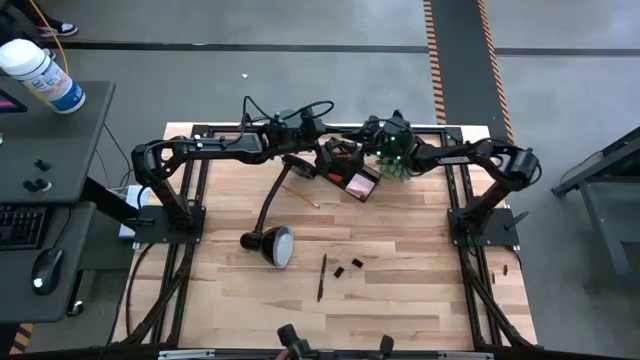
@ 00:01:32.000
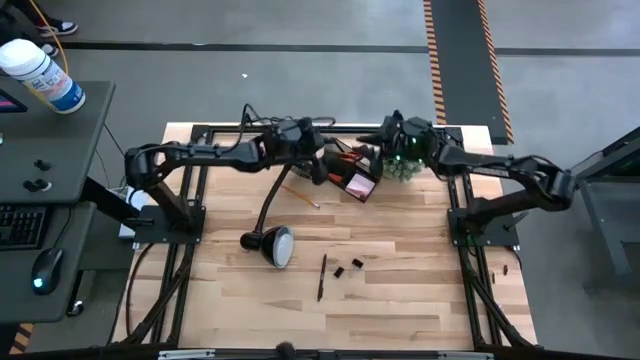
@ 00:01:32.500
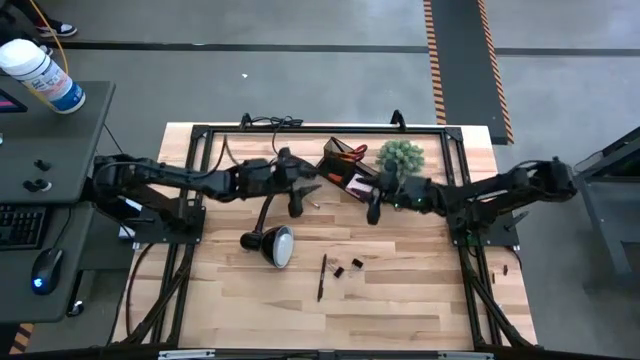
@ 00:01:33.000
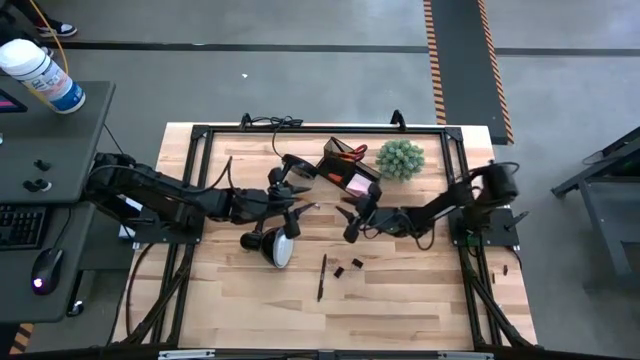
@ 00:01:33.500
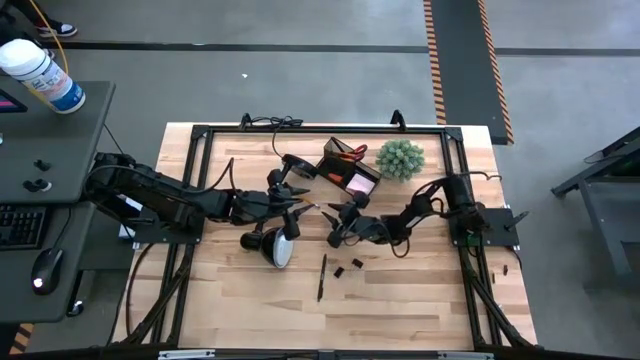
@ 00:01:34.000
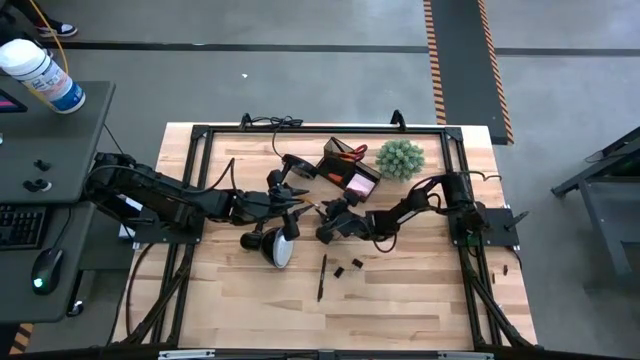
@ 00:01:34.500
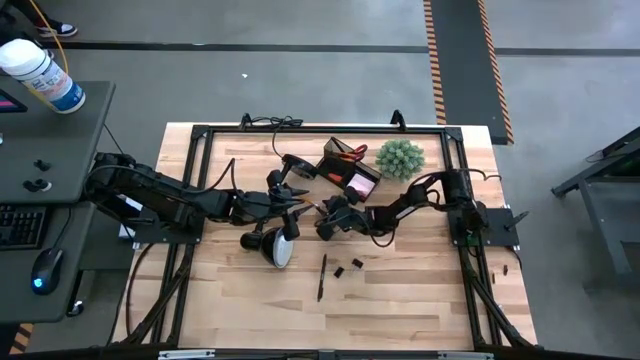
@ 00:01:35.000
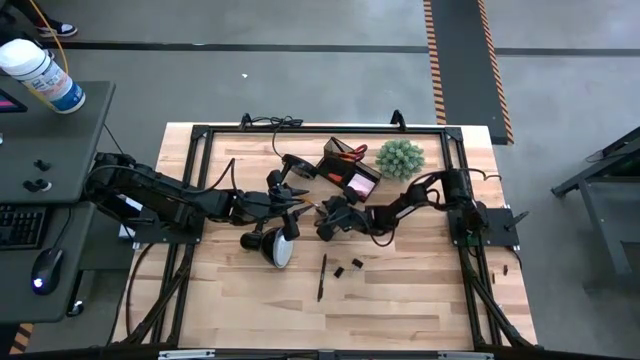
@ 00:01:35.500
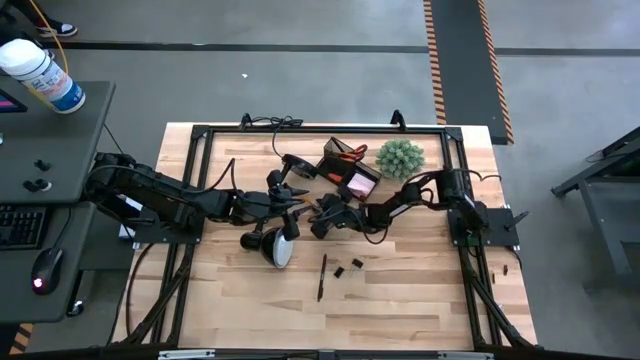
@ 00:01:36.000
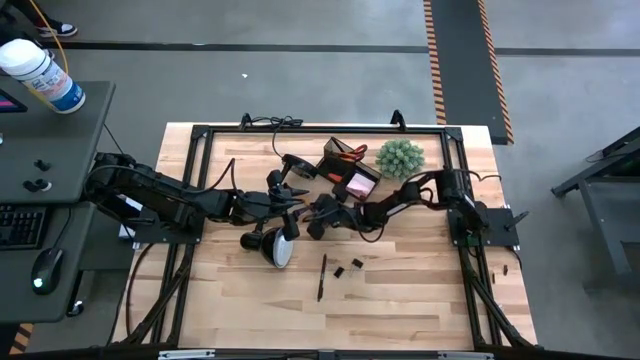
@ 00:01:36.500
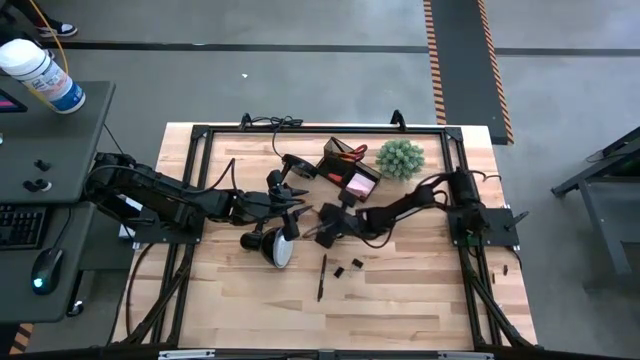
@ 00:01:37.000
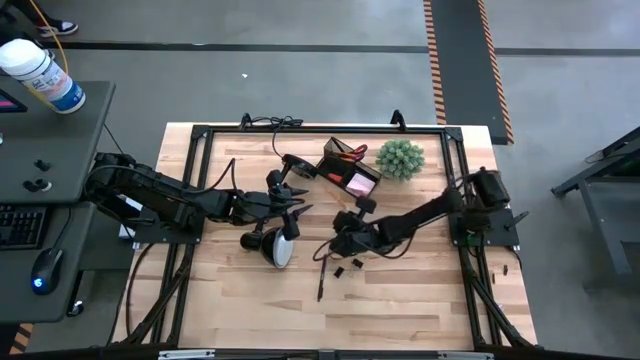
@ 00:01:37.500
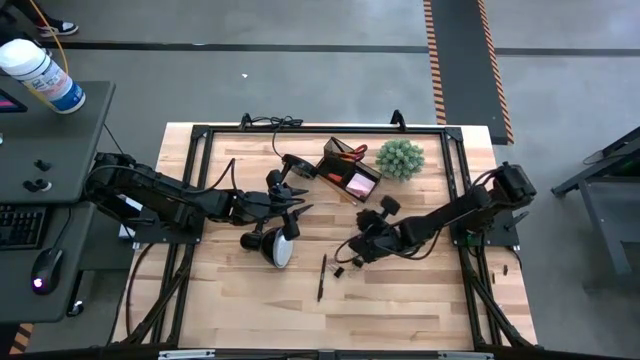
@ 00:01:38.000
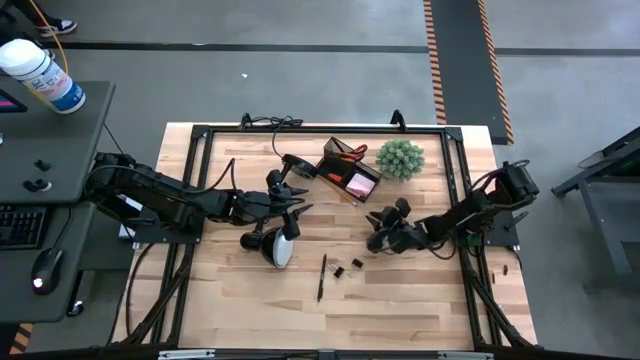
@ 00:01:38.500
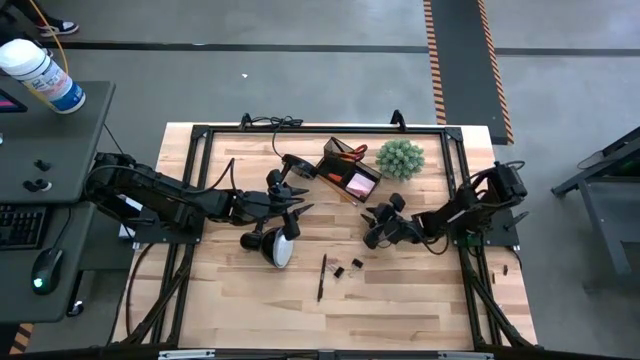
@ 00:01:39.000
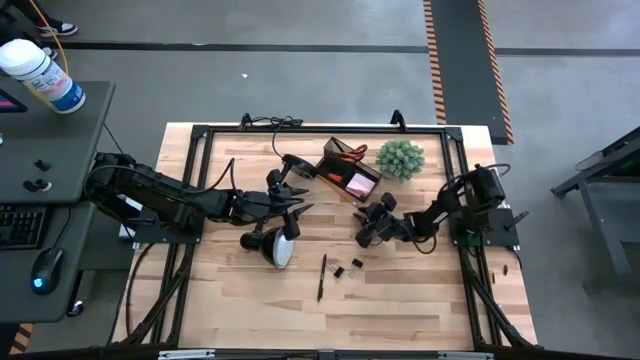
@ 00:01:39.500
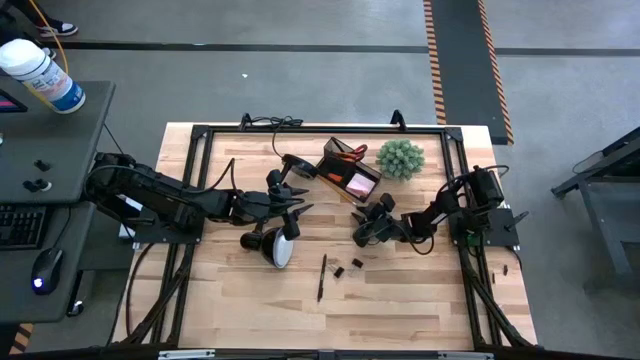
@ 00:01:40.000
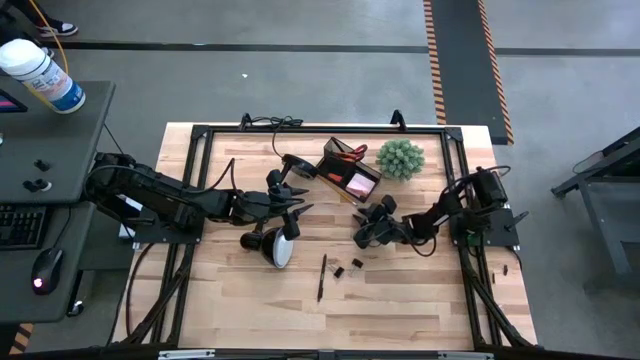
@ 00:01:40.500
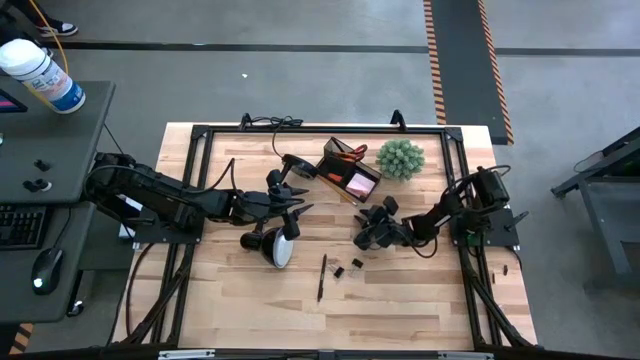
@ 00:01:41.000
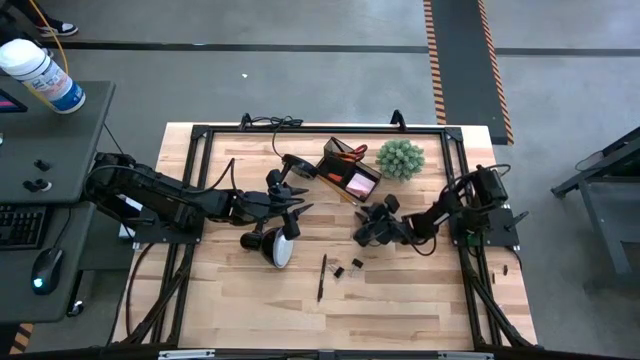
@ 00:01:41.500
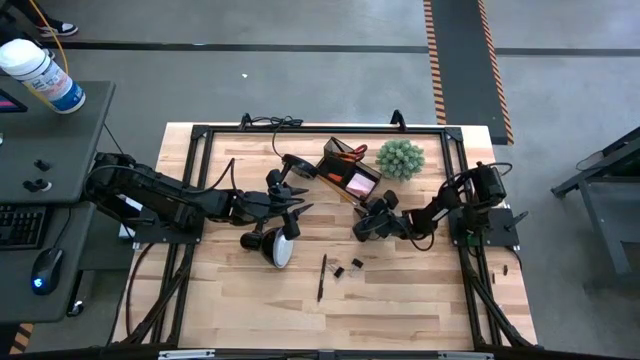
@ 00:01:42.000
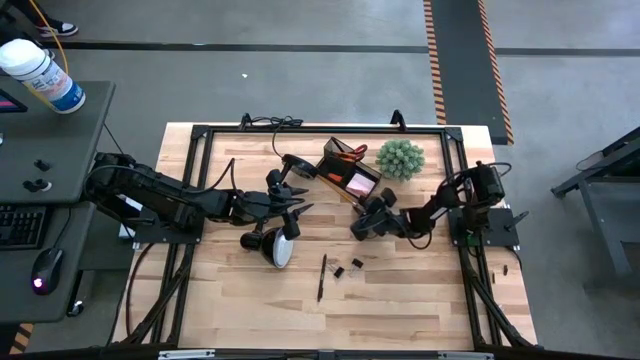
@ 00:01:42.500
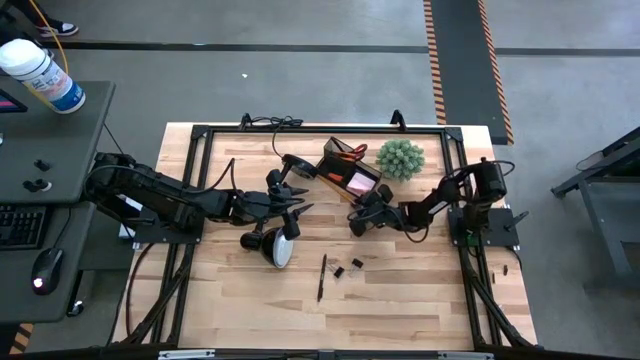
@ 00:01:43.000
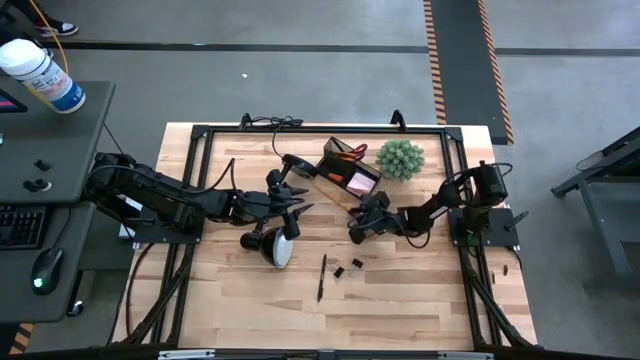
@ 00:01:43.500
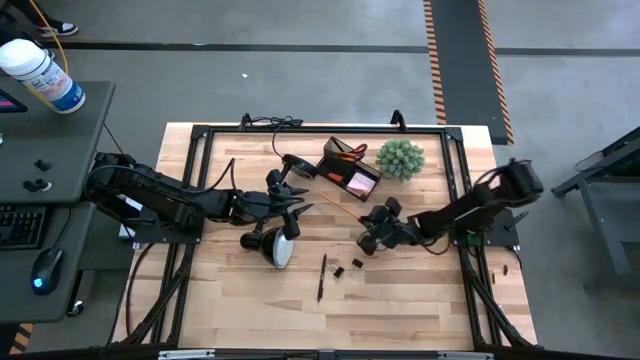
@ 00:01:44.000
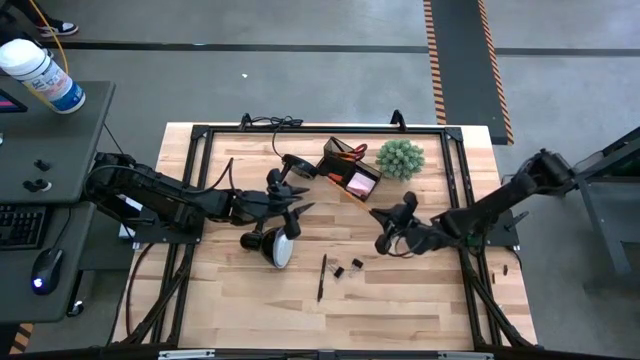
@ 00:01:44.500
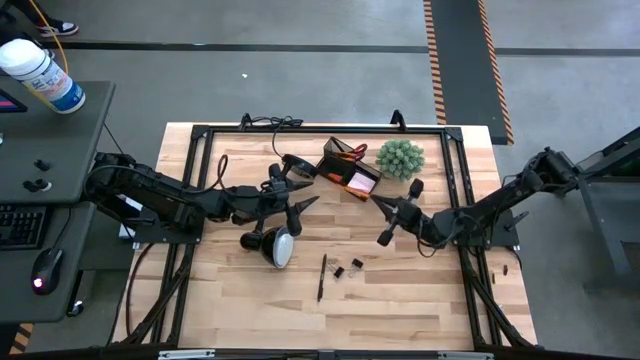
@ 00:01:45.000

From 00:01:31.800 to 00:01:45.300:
Task: Pick and place office supplies into organizer
Put the orange pencil into the desk organizer

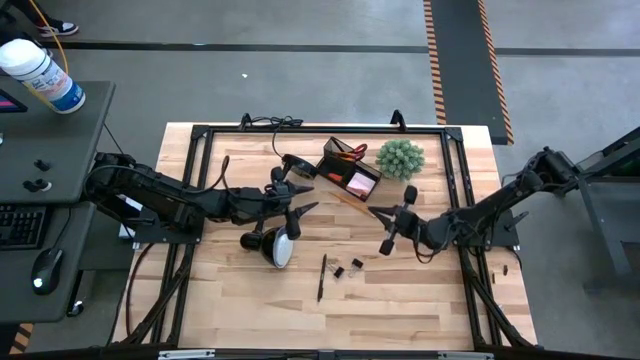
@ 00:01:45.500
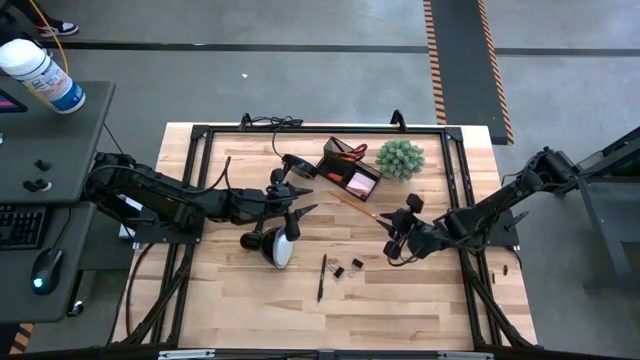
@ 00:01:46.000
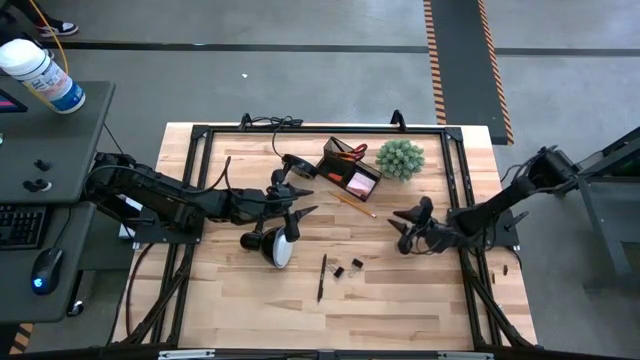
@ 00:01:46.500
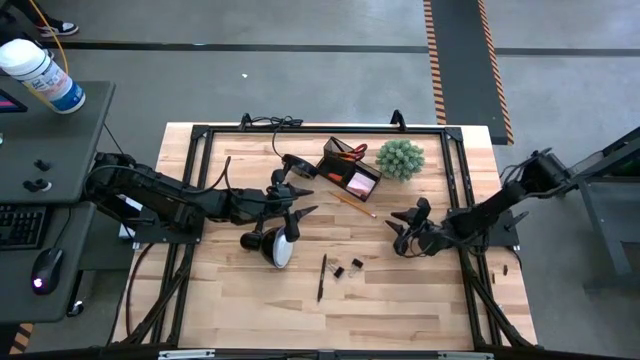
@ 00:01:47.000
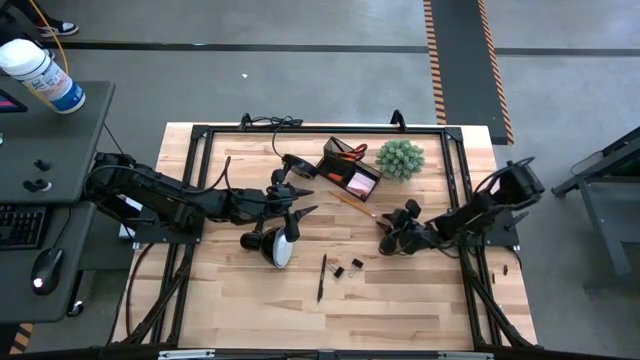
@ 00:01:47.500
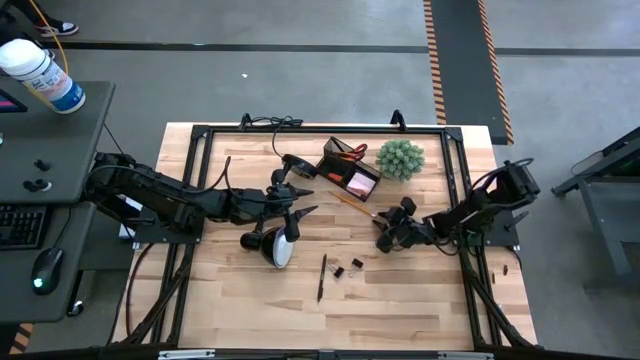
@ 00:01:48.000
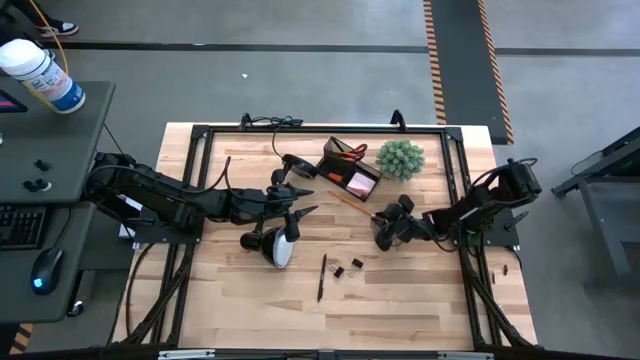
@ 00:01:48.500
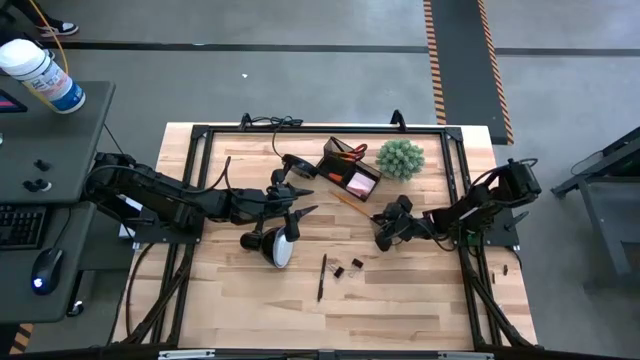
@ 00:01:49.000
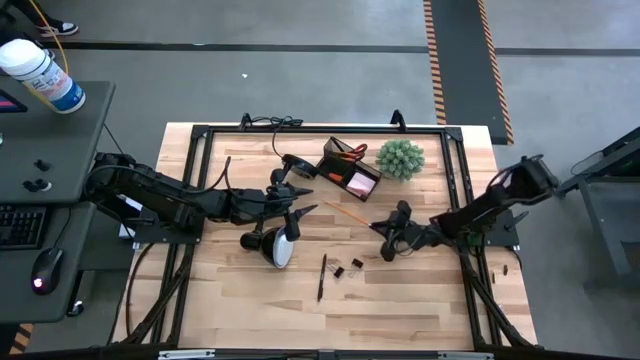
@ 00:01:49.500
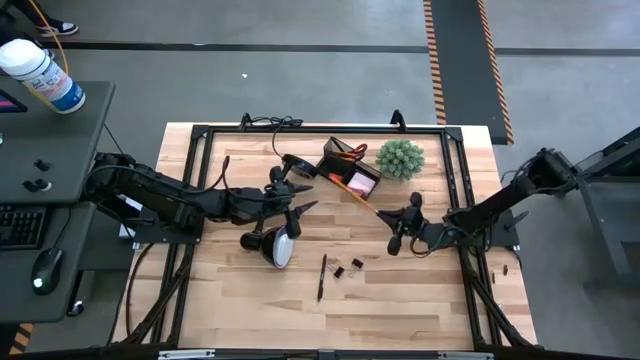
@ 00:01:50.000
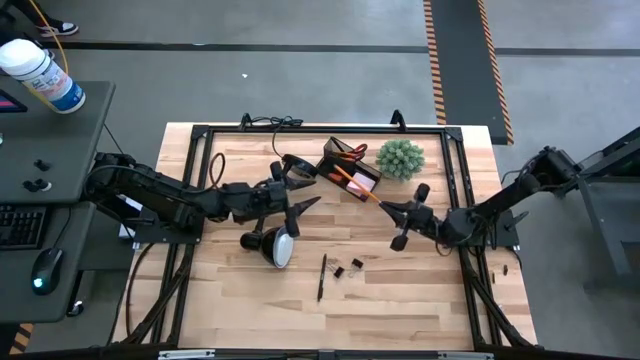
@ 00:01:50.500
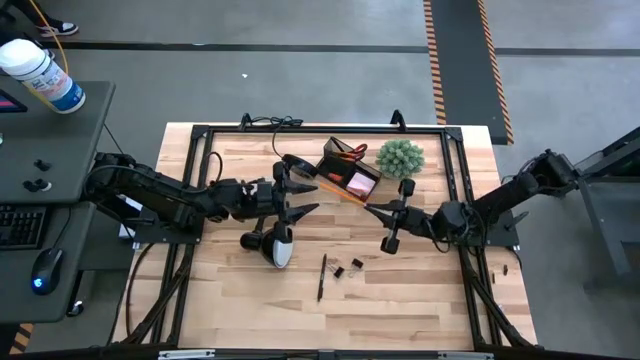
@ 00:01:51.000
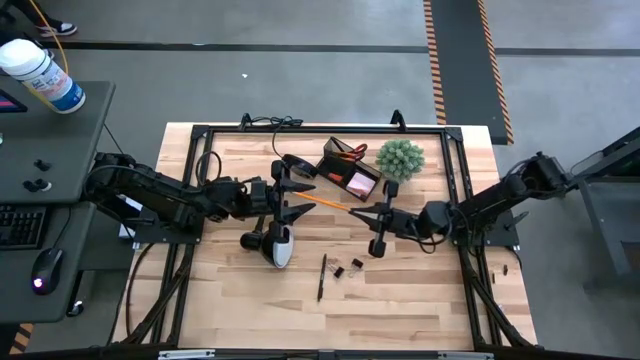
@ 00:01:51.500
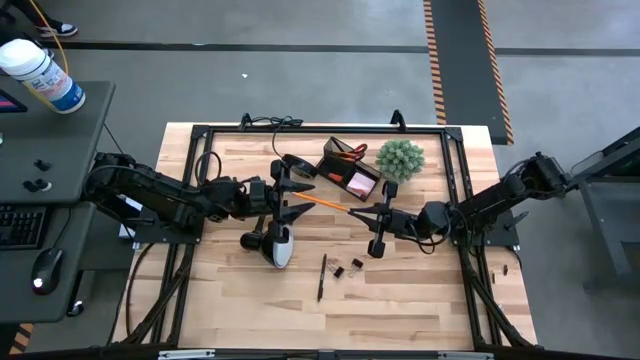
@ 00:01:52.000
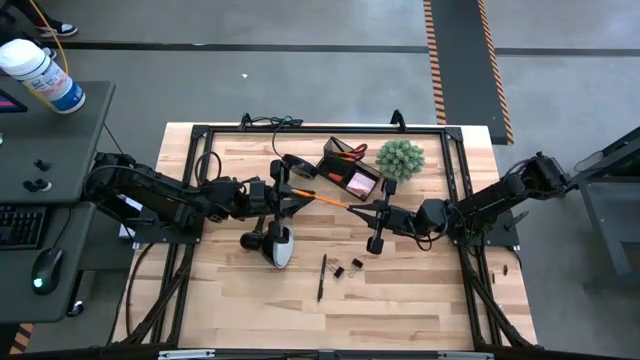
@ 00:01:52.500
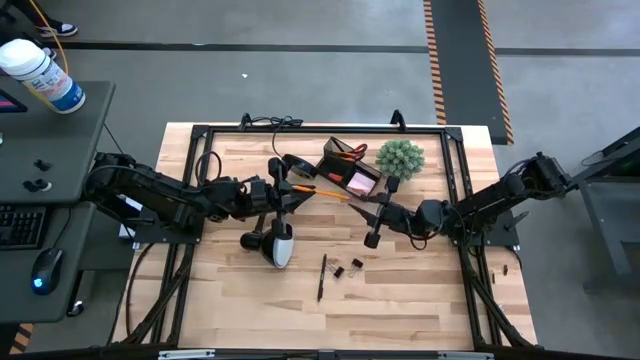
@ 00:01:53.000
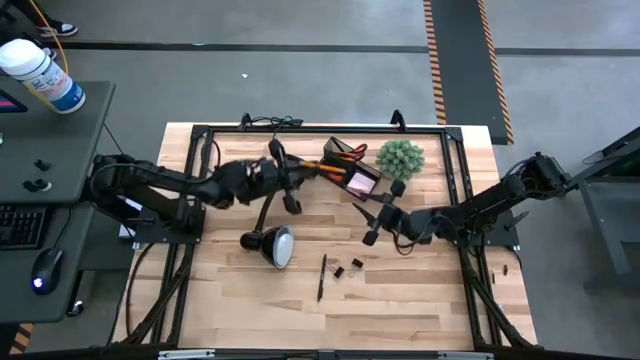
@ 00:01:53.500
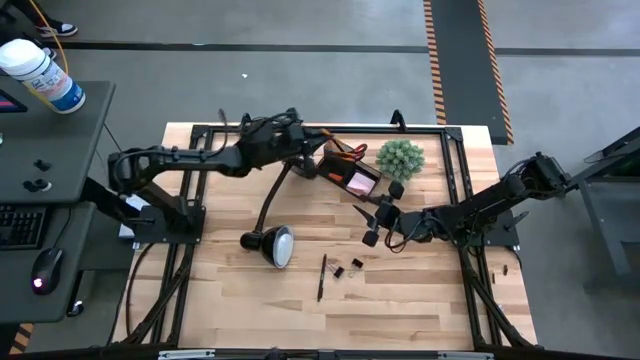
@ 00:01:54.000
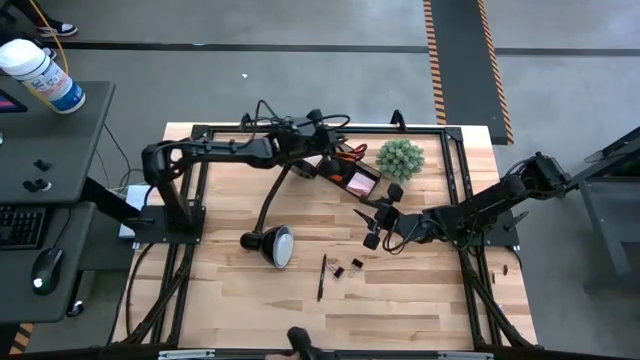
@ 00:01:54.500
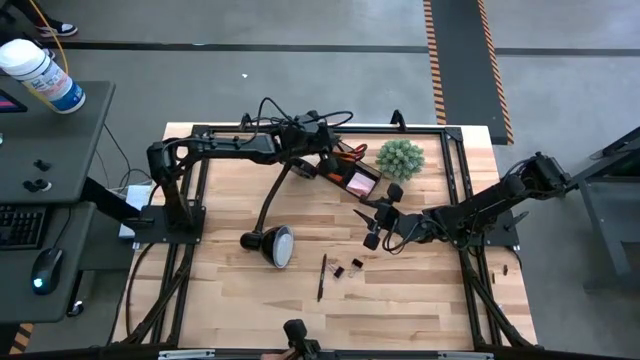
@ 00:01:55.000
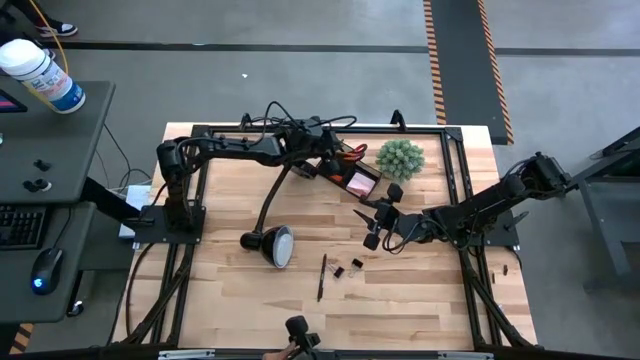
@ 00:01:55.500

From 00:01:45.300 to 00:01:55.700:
Put the orange pencil into the desk organizer
